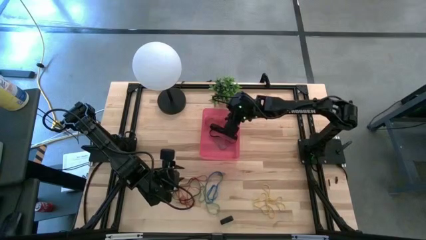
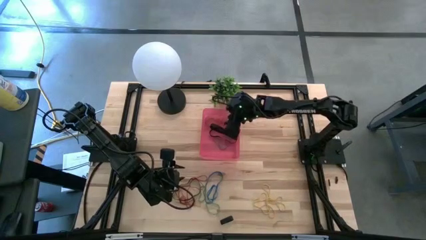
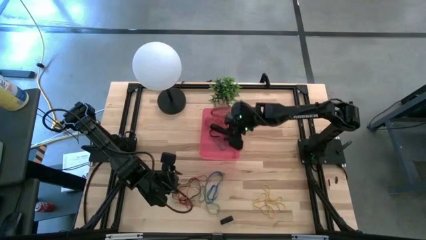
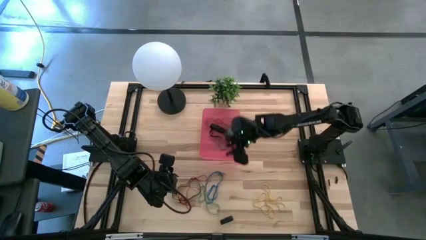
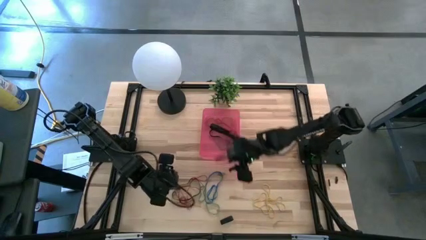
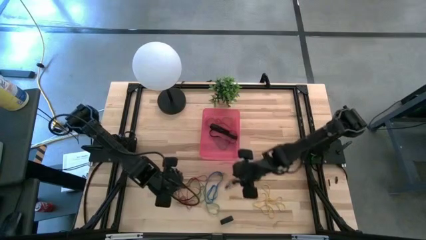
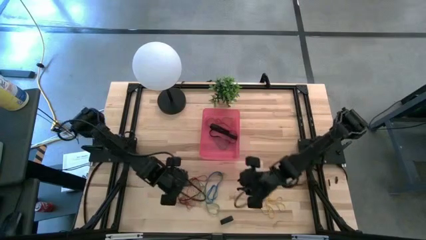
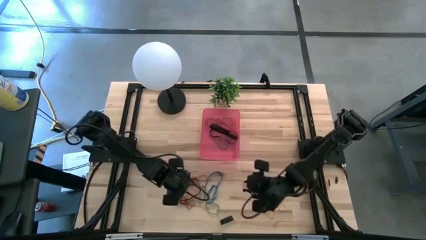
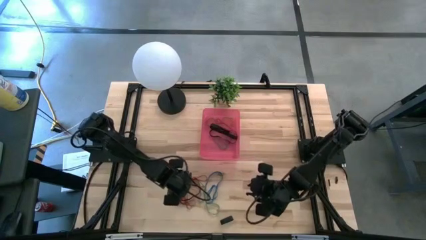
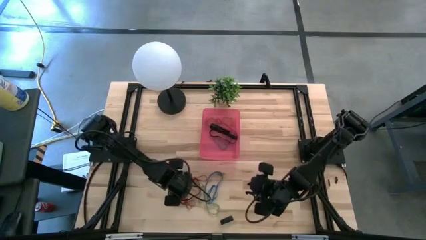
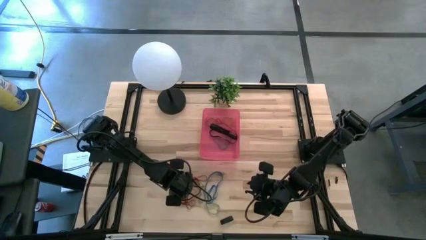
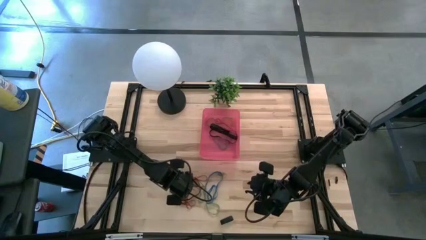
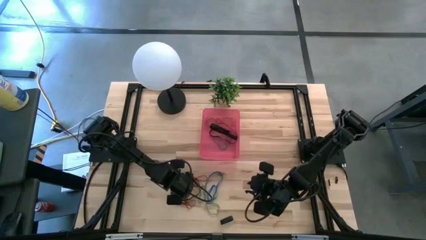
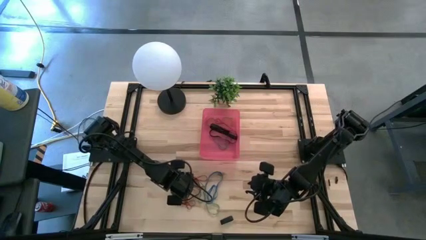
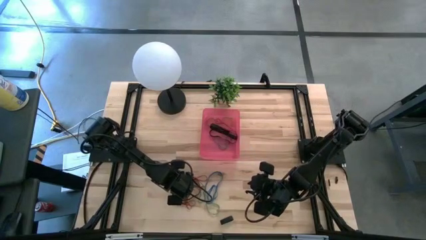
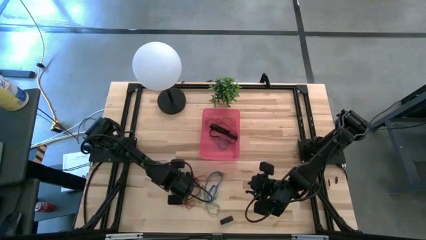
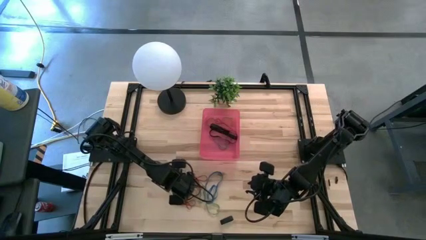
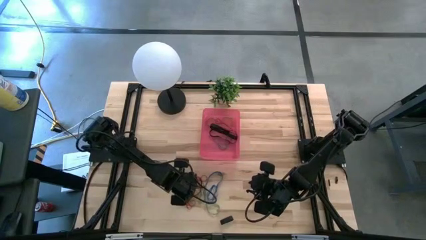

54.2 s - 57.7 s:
Task: Pick and place rubber bands into bin
Put the black rubber band into the red bin

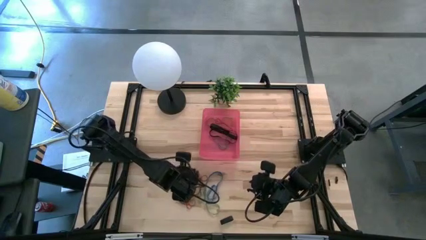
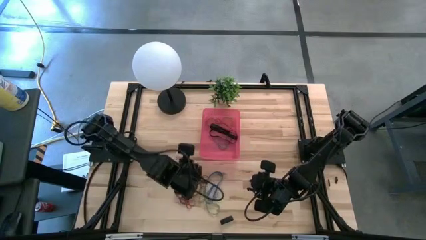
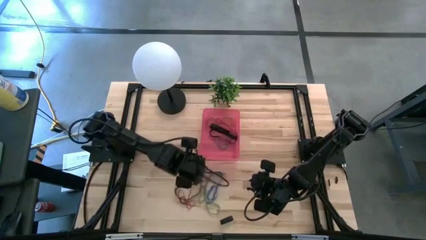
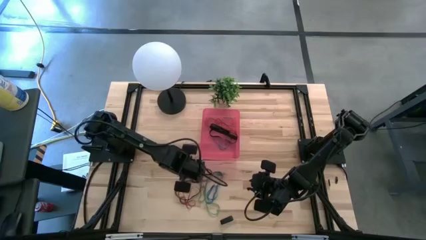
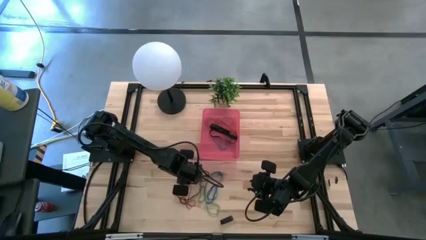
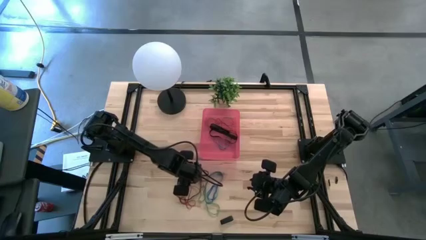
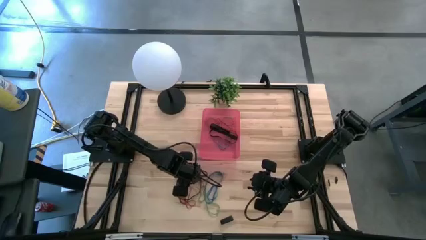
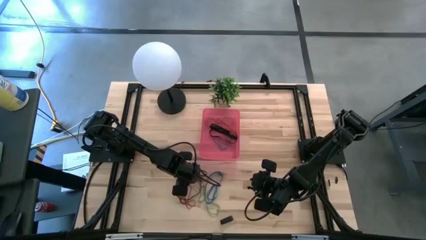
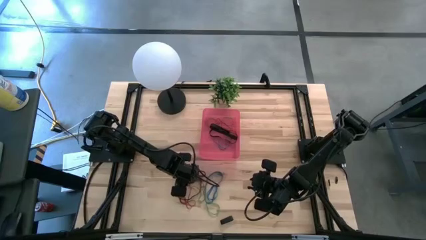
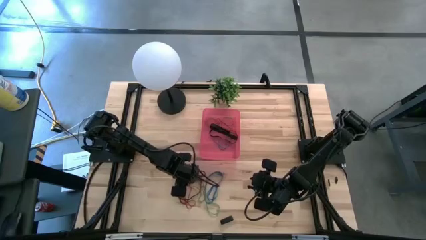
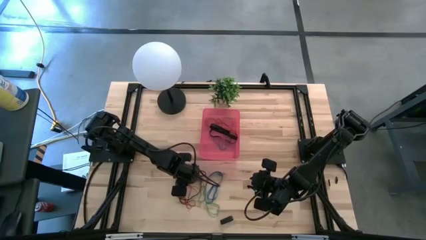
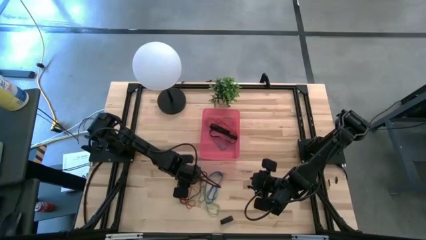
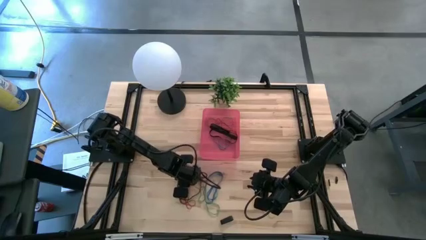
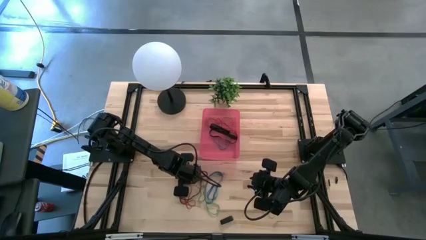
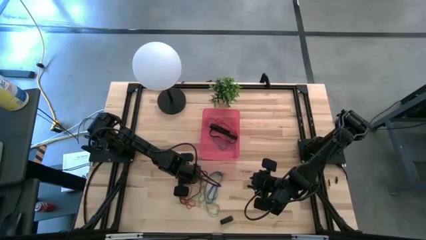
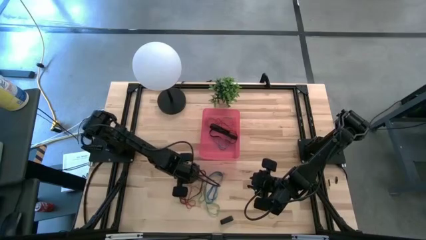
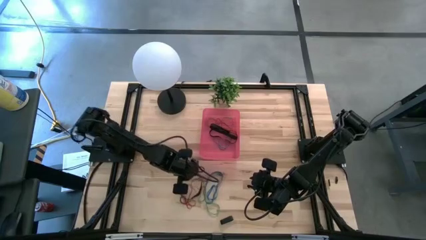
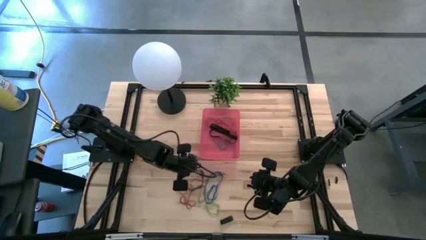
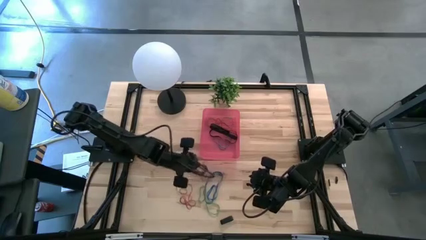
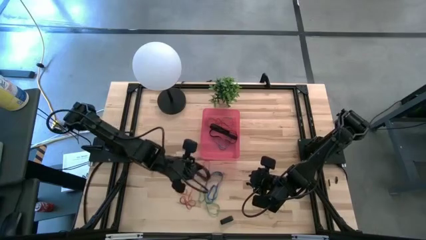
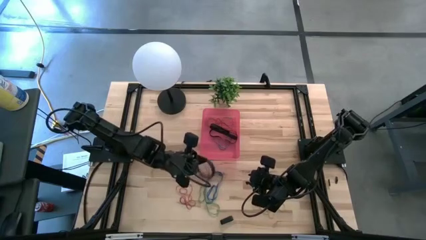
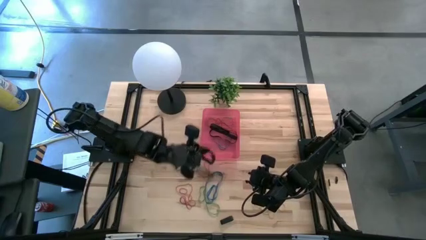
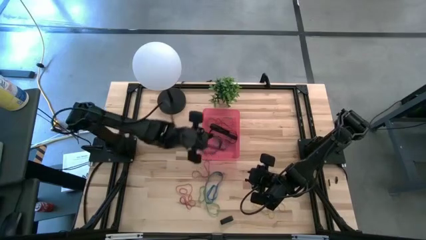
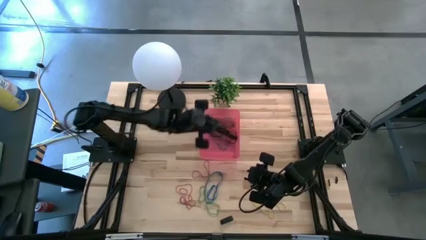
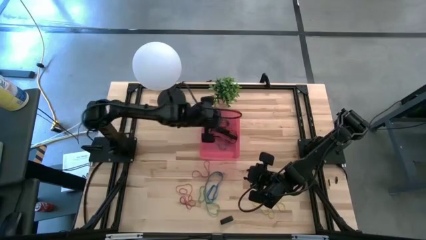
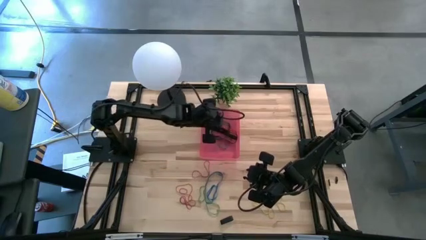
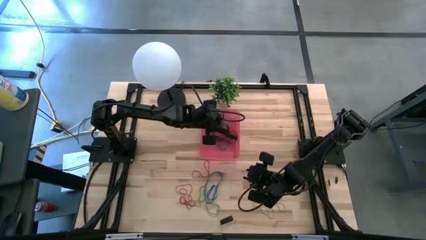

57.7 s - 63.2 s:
Put the black rubber band into the red bin

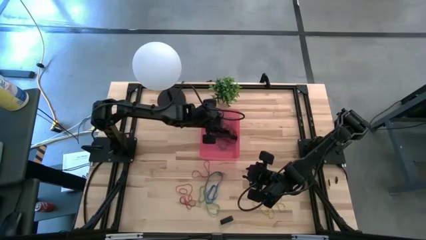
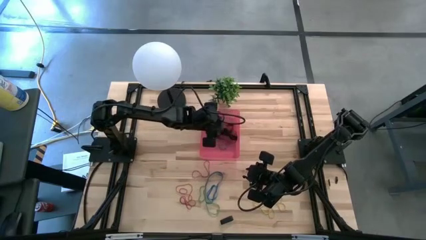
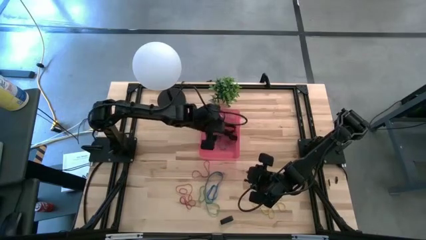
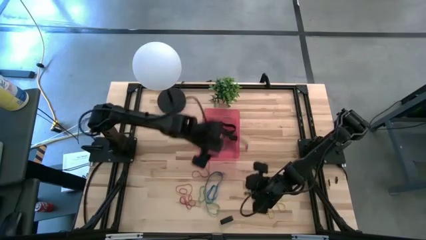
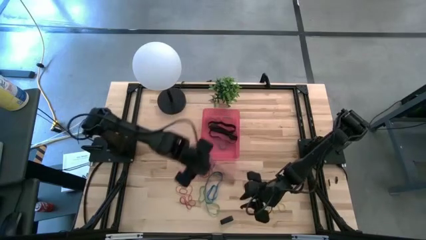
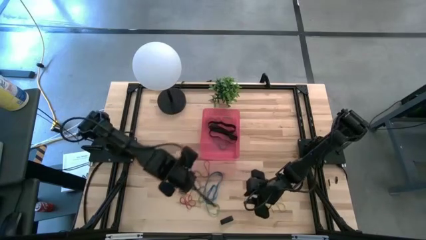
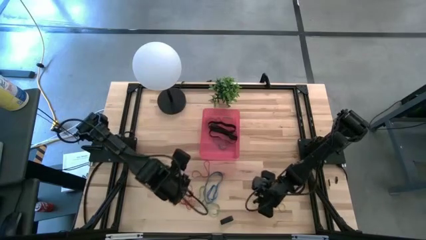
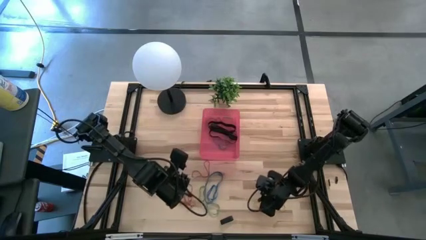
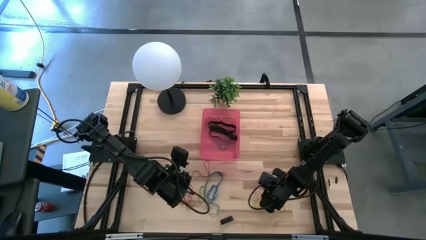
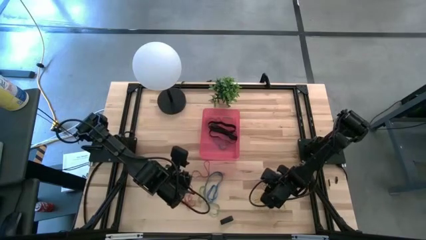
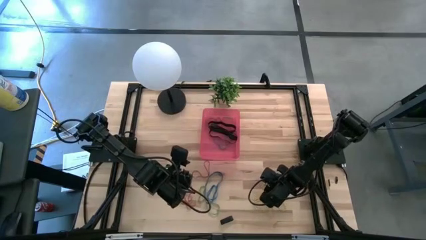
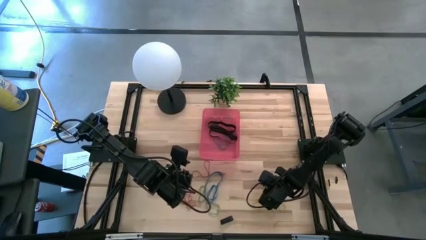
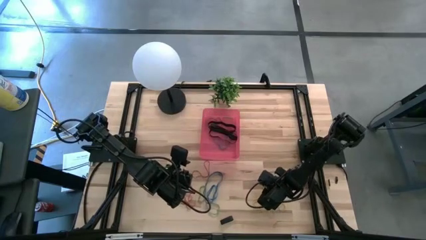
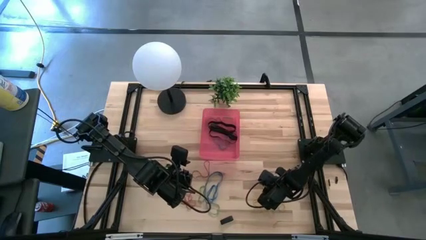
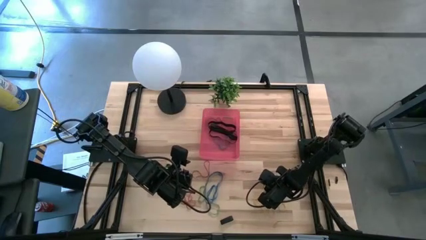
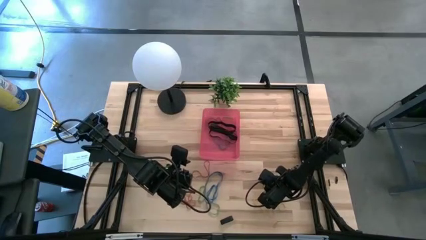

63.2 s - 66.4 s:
Put the yellow rubber band into the red bin

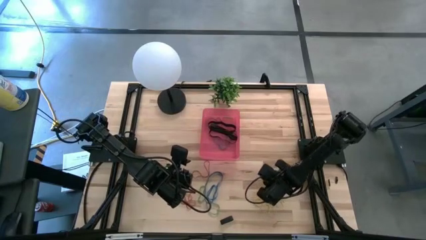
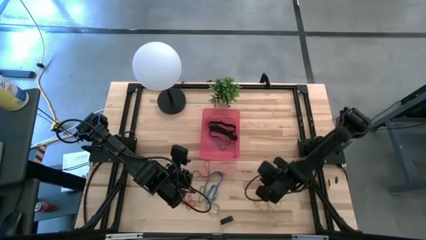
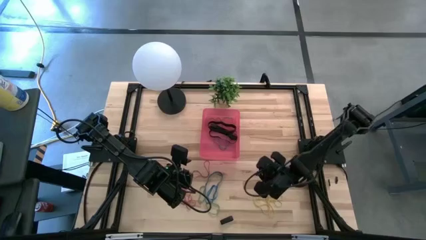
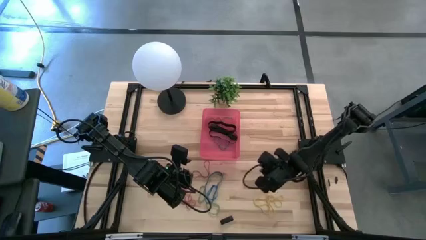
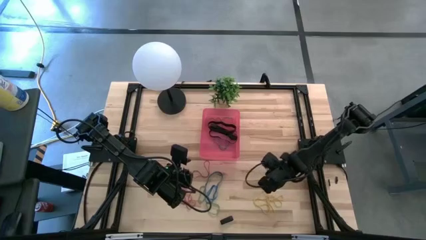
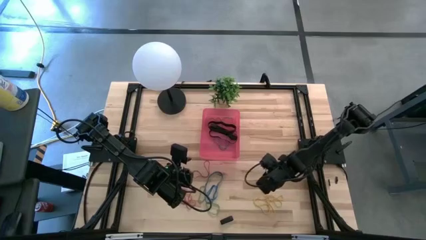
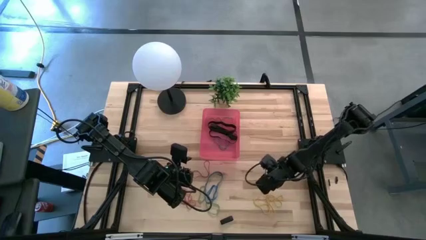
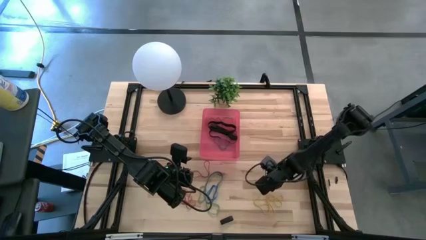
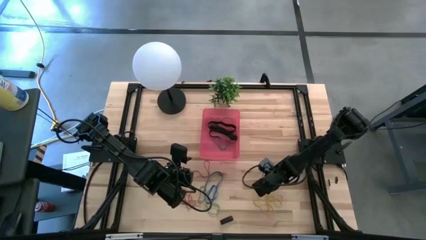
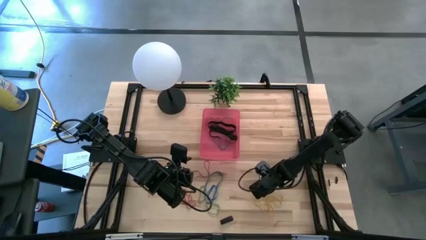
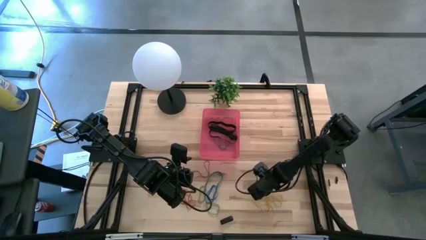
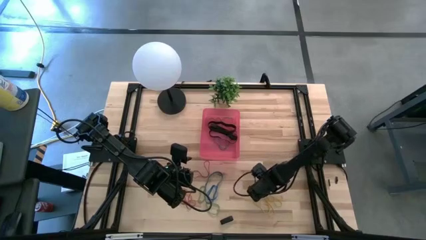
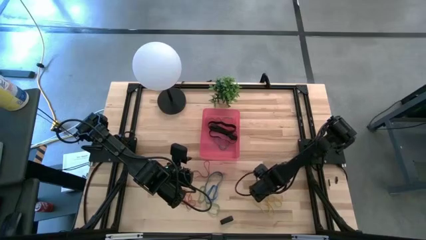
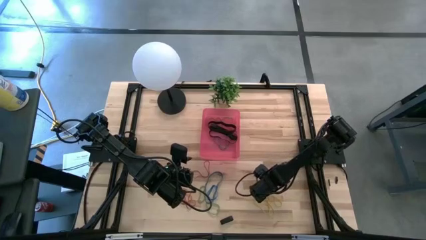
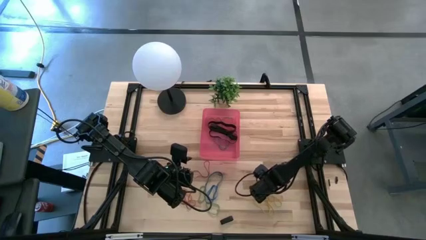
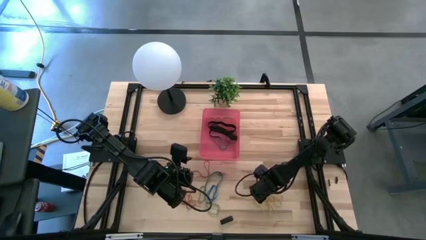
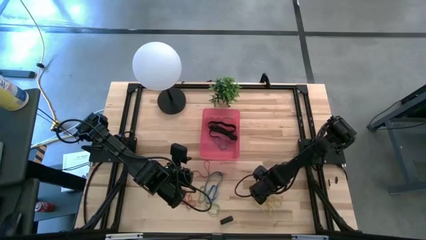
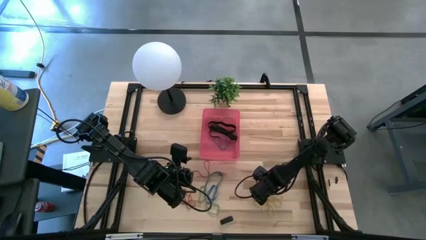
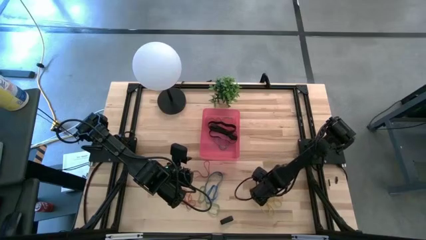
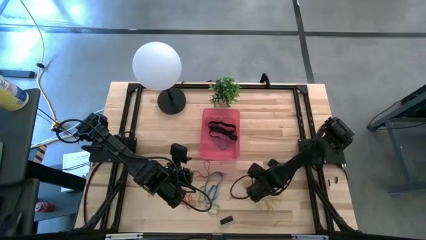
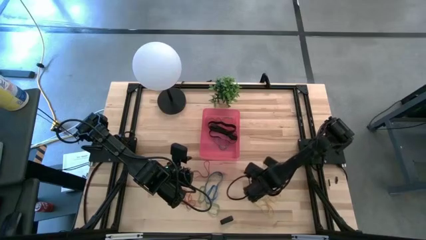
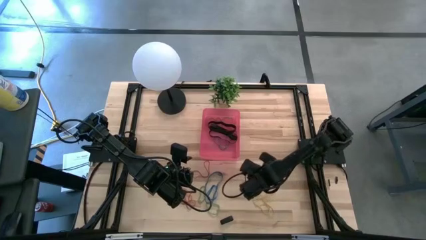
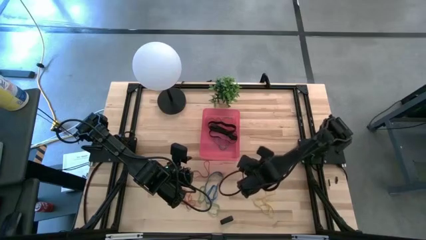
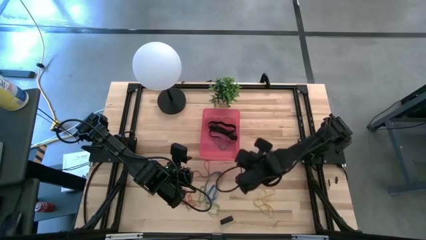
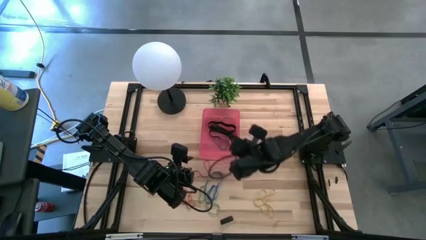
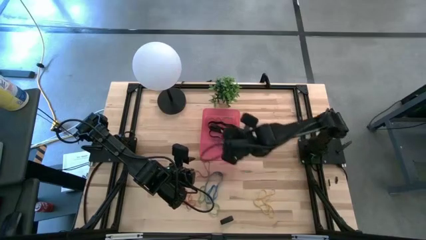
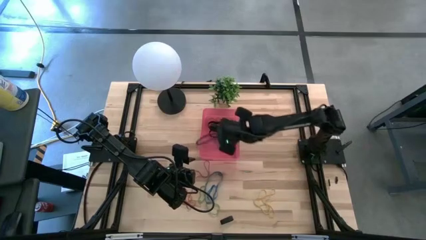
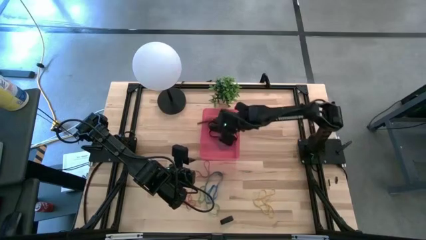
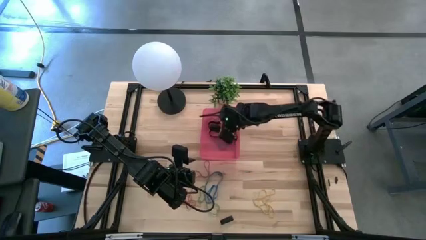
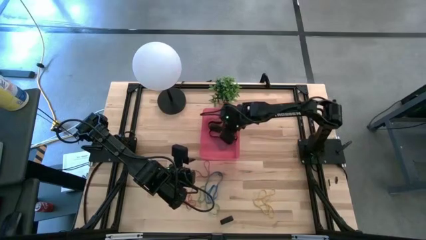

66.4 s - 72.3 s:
Put the yellow rubber band into the red bin
